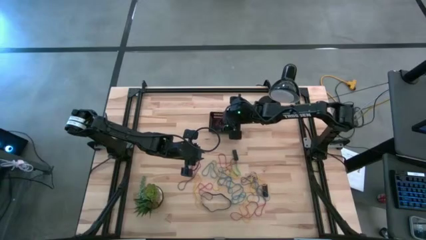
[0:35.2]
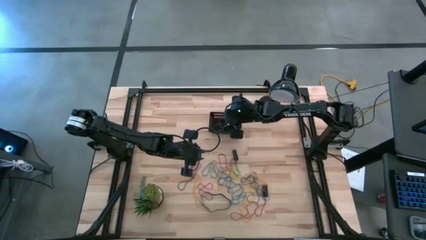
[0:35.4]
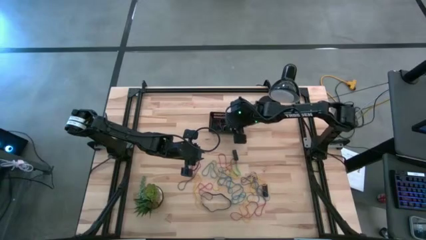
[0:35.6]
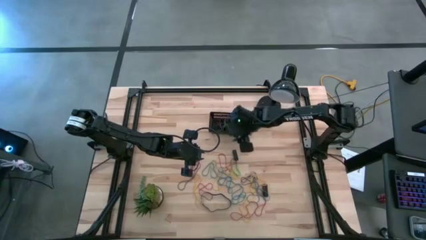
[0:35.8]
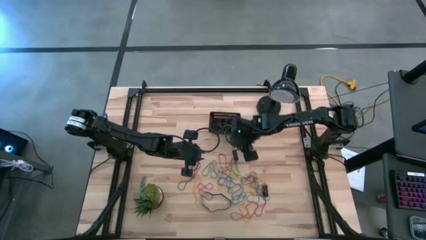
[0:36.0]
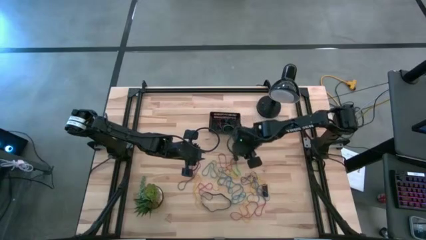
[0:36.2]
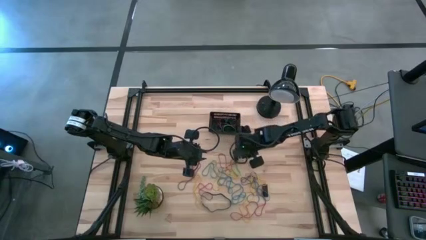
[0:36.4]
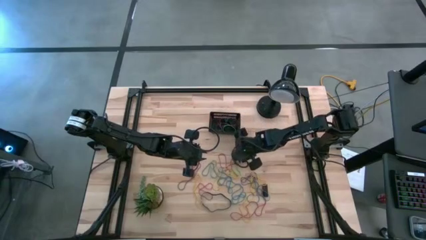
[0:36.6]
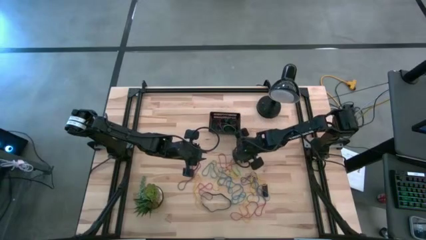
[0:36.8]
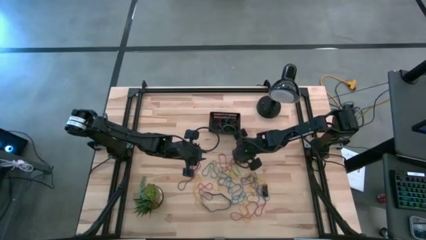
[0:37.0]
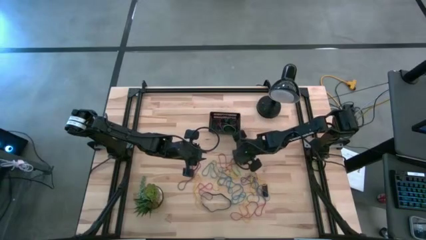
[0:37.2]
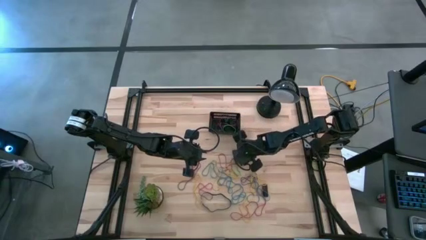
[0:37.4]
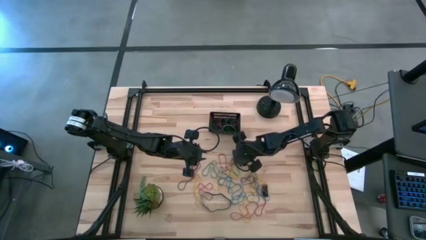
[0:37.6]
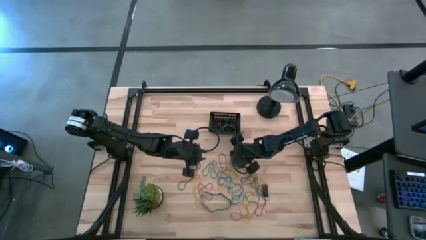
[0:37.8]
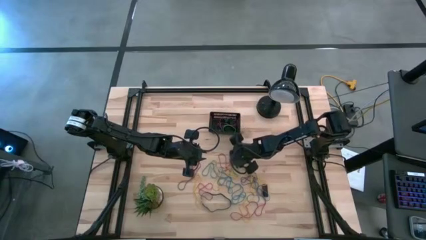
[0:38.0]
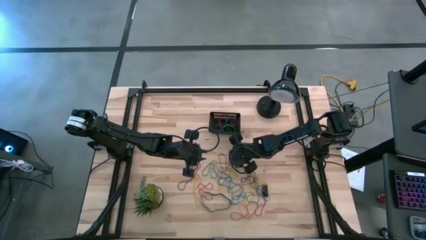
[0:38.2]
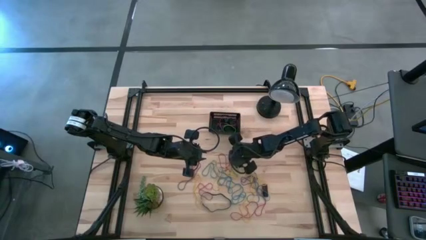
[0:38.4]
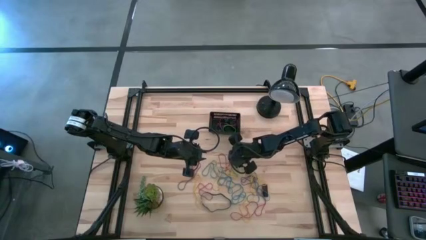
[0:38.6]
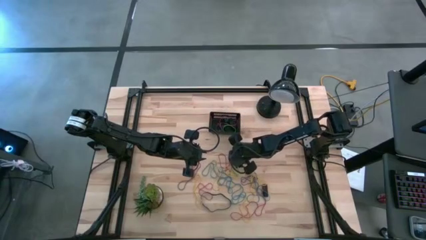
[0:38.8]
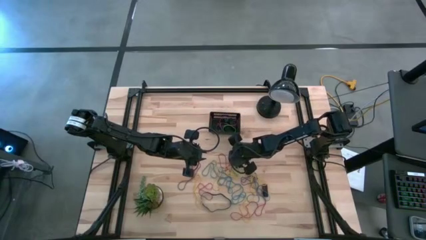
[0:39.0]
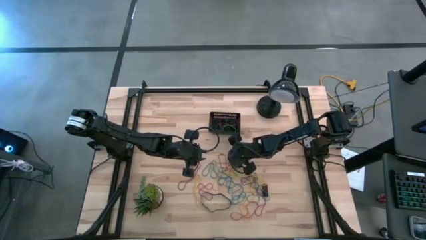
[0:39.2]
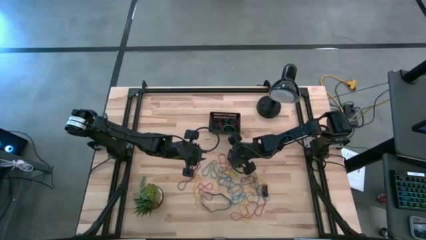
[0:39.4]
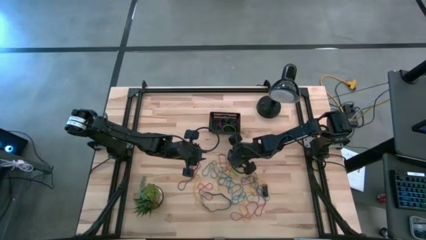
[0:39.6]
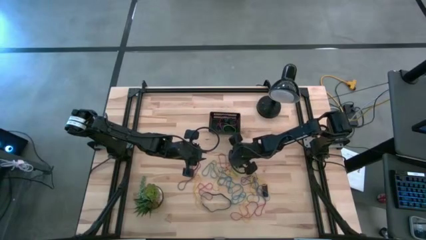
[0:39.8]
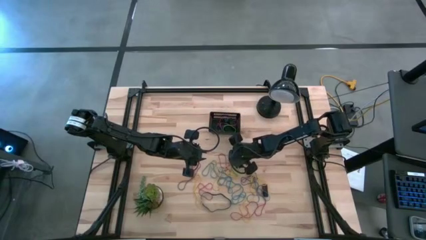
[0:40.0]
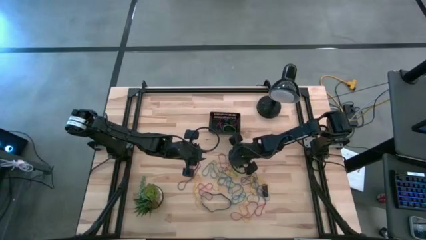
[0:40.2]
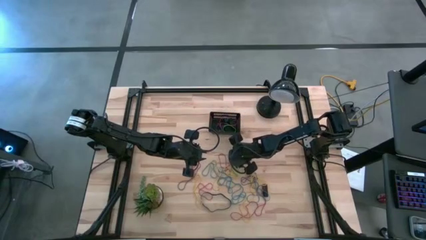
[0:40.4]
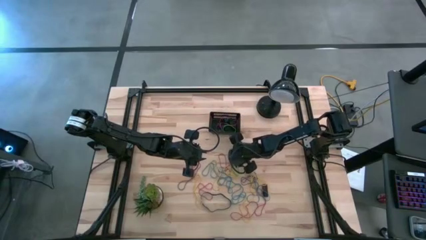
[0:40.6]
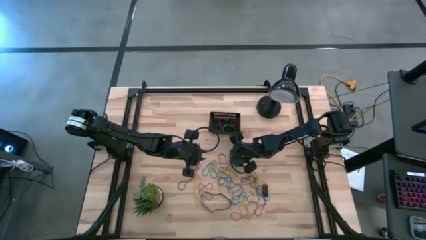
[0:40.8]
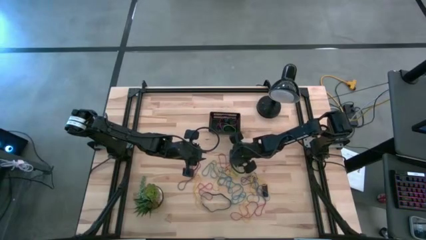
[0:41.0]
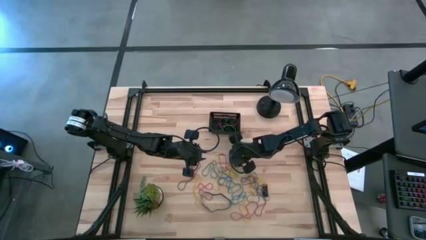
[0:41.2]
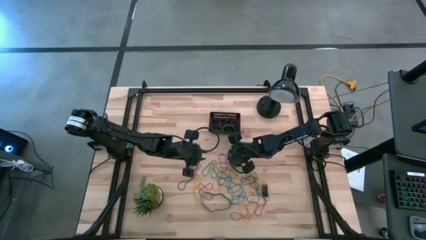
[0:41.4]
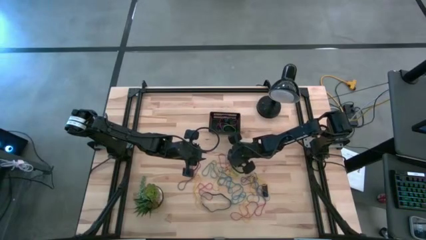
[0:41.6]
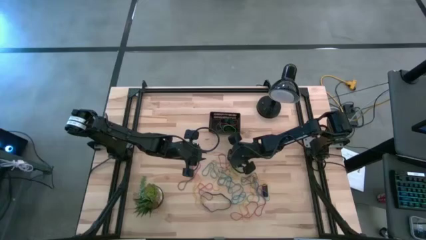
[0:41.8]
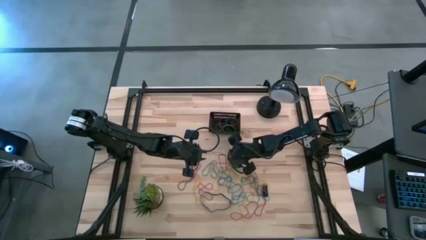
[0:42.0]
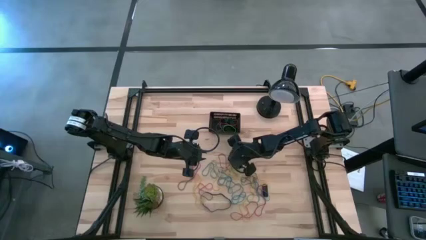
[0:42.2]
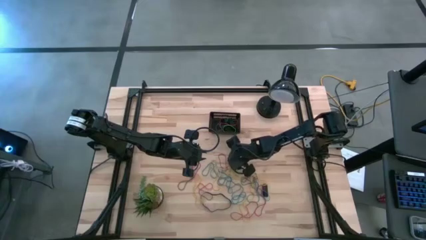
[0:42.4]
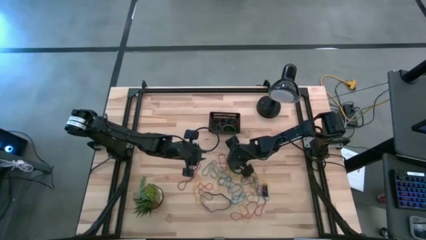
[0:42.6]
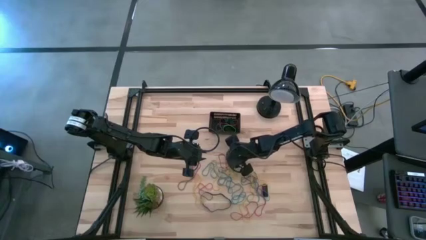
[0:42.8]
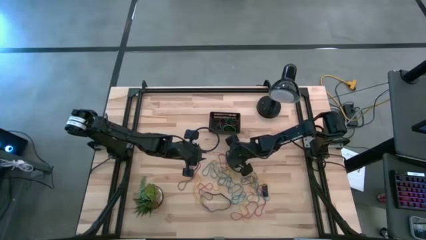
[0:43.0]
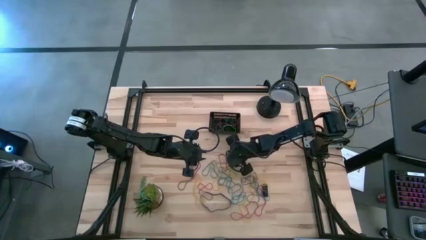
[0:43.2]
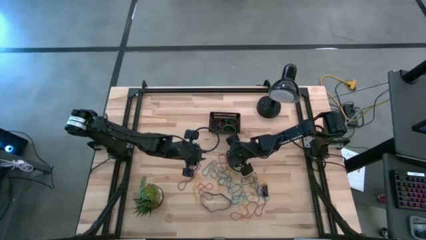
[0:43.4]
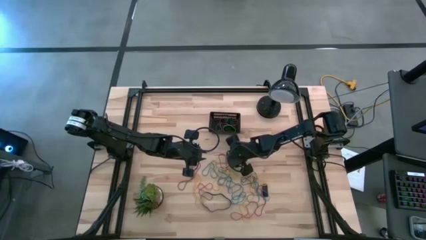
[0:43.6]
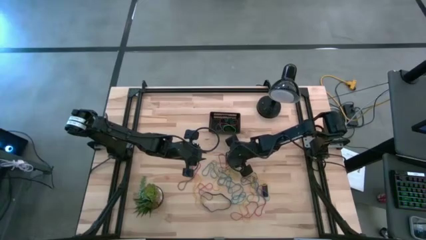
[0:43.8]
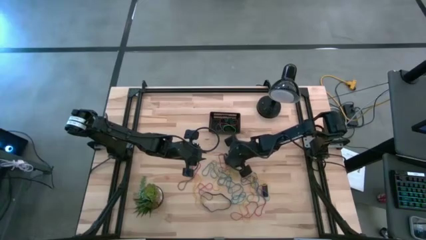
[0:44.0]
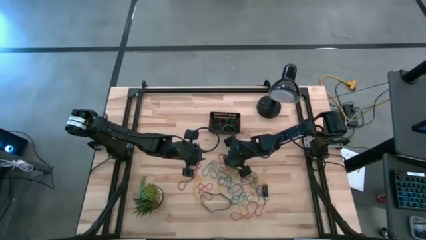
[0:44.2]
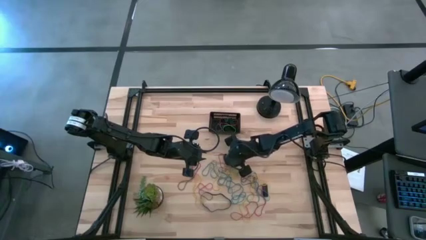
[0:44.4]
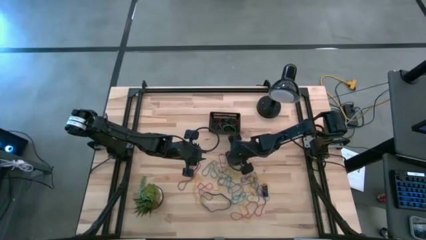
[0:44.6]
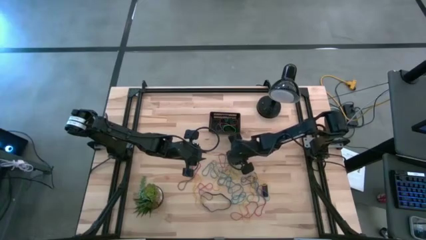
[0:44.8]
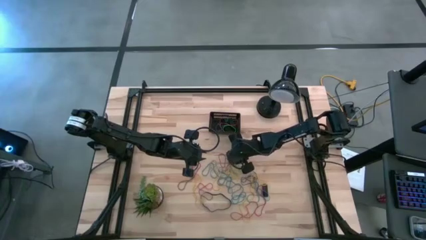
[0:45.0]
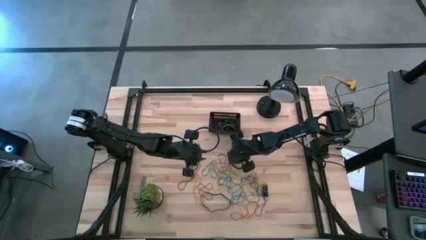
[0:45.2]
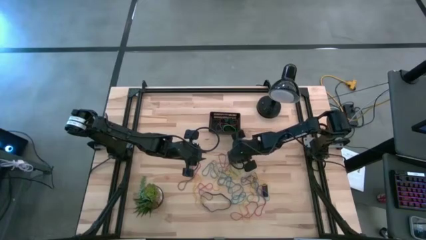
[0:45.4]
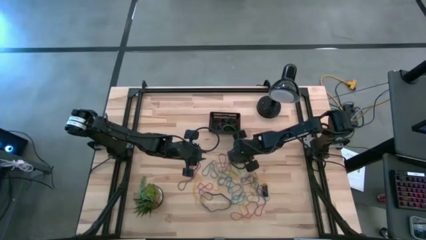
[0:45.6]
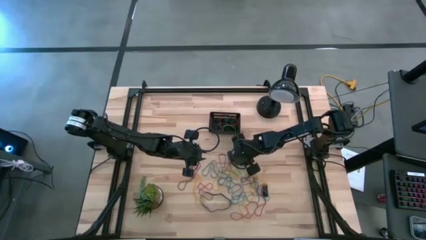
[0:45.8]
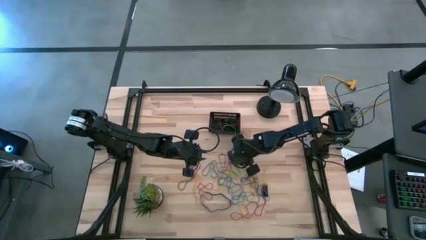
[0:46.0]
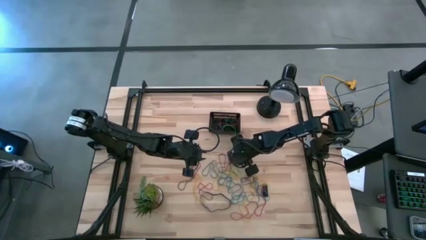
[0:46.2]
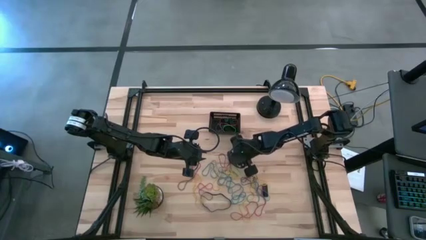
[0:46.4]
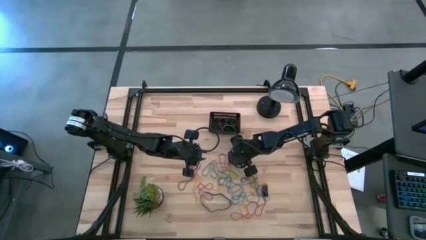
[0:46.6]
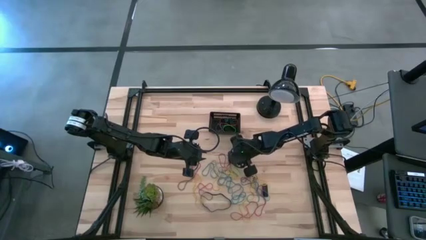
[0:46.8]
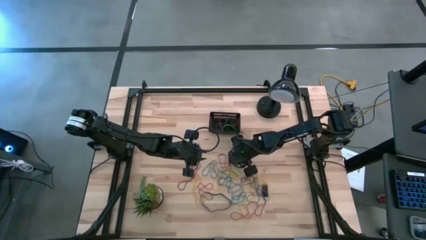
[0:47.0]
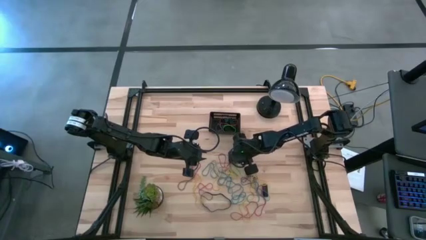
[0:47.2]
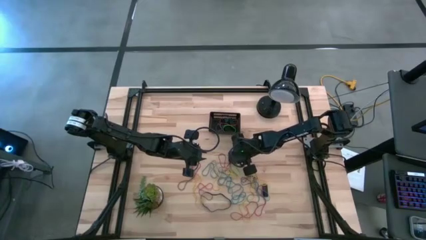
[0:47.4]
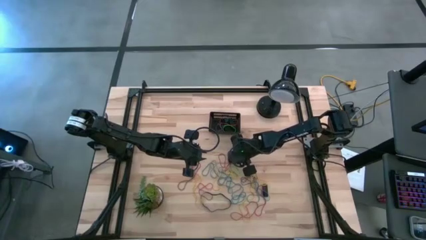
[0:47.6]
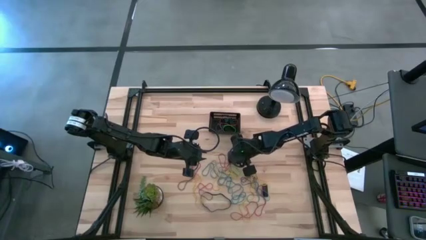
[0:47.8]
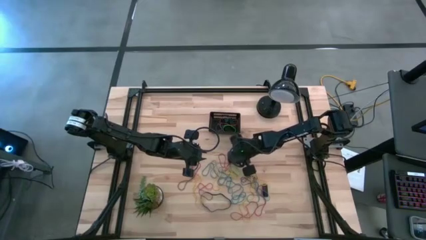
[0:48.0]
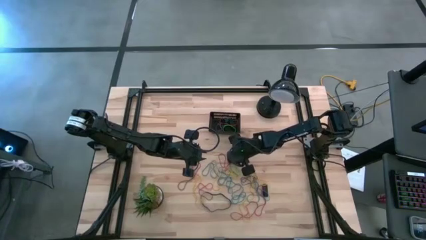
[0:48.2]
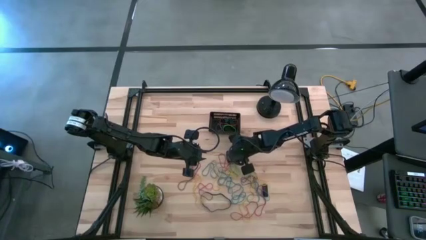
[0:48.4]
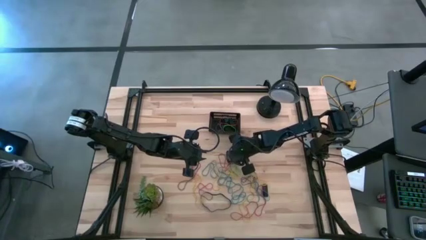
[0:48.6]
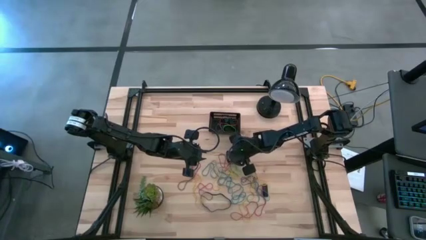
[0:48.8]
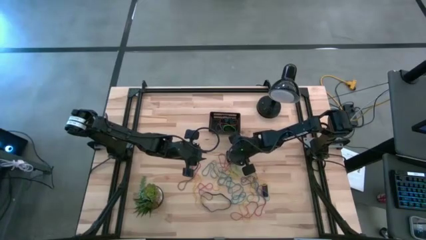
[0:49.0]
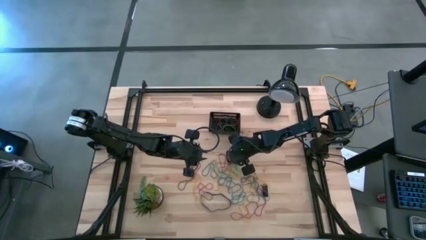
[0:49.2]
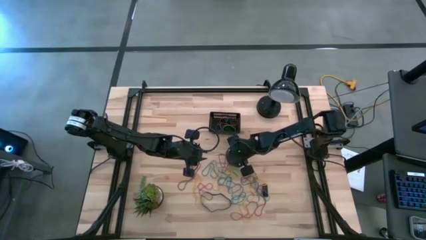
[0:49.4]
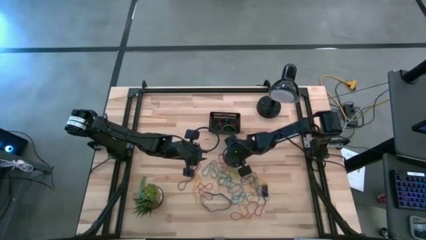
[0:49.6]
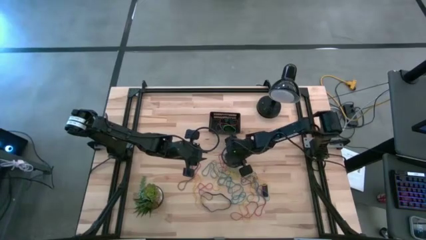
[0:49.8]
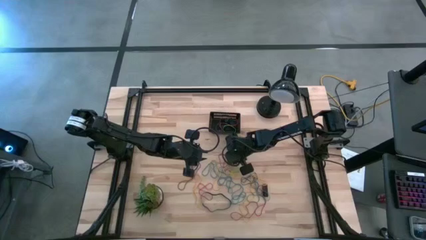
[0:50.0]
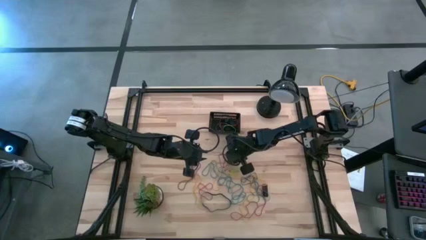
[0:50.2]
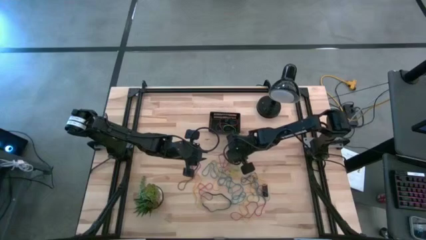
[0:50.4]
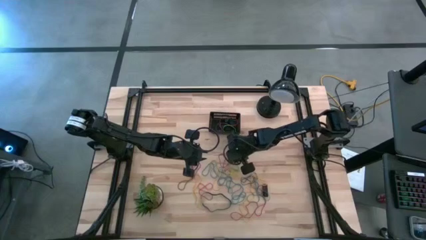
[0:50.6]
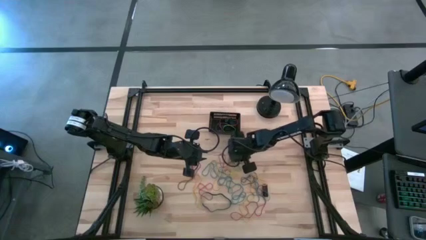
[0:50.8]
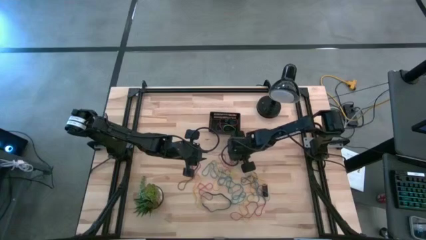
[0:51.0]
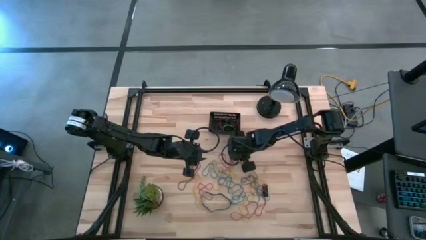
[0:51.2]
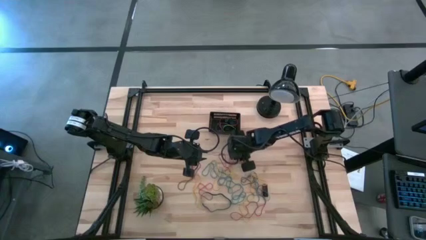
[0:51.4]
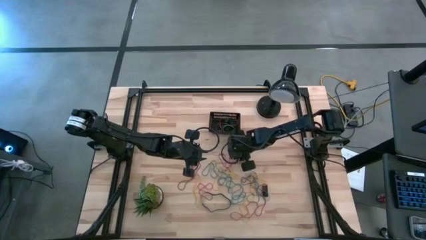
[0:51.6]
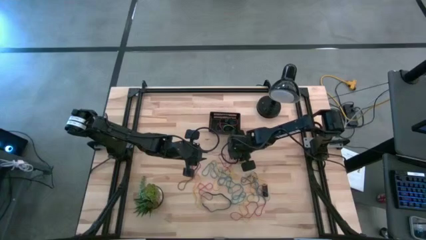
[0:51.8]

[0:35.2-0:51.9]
Task: Pick and place rubber bands into bin
Put the black rubber band into the basket
